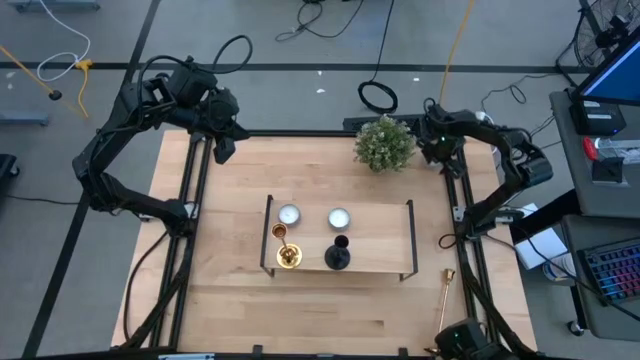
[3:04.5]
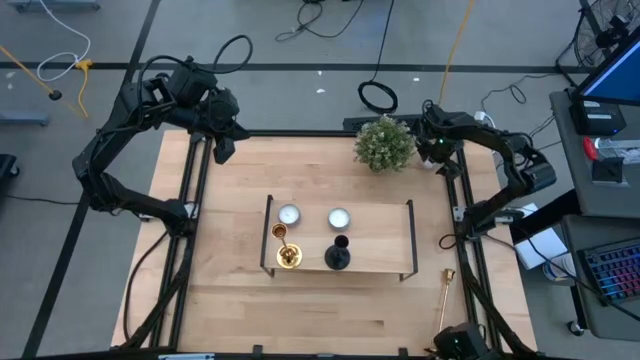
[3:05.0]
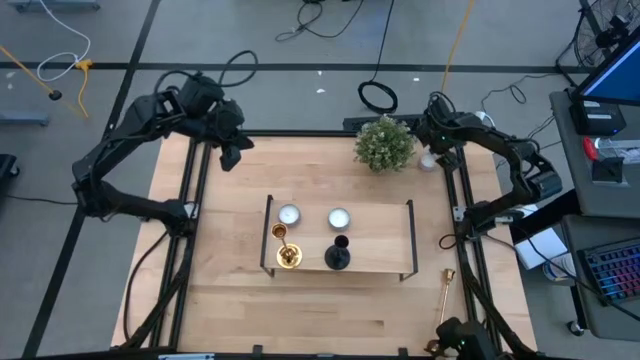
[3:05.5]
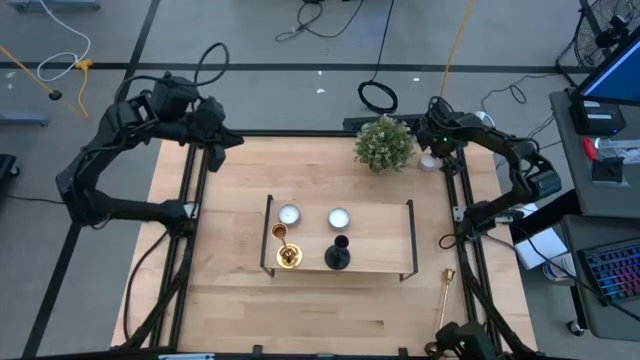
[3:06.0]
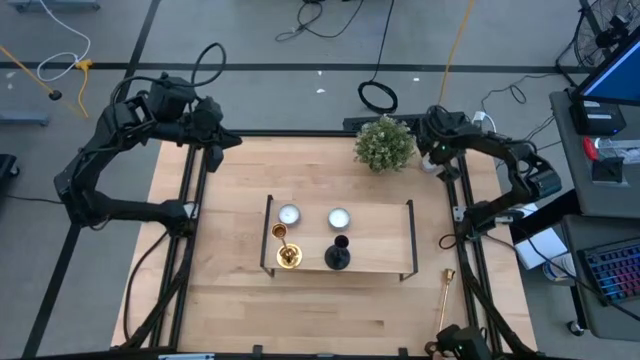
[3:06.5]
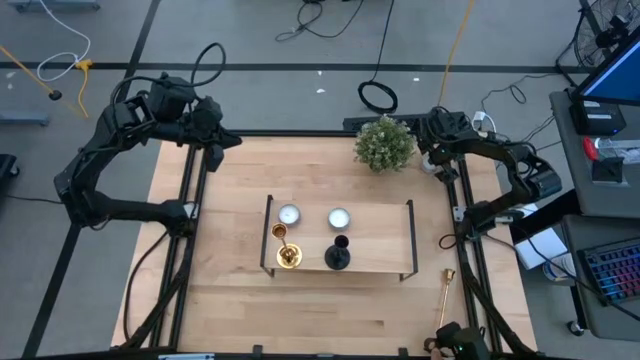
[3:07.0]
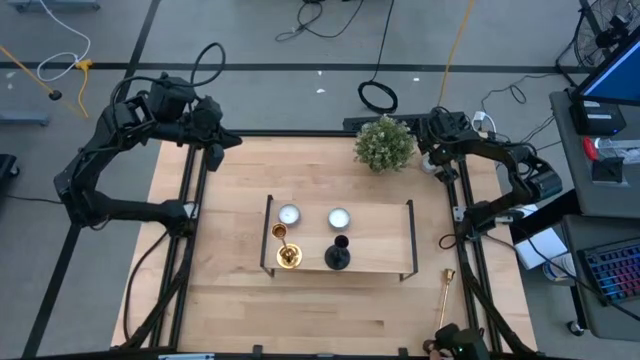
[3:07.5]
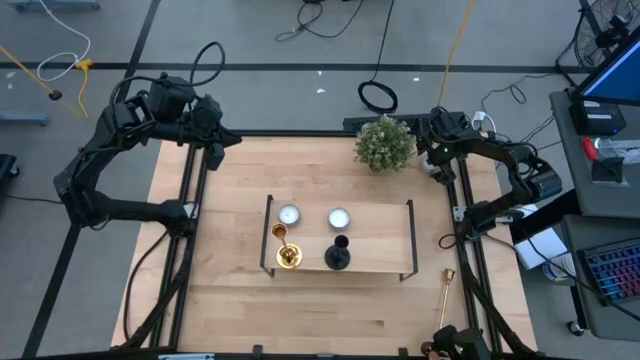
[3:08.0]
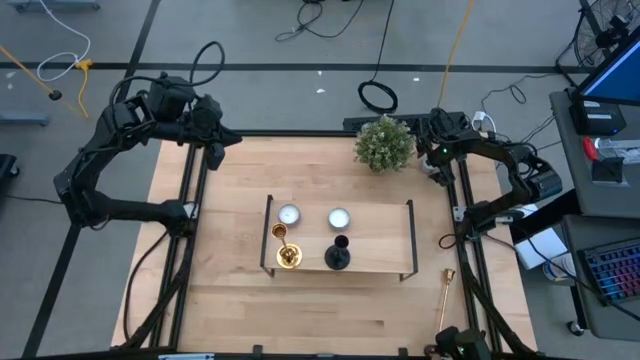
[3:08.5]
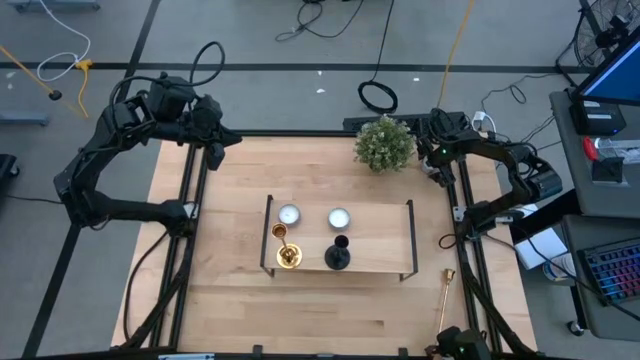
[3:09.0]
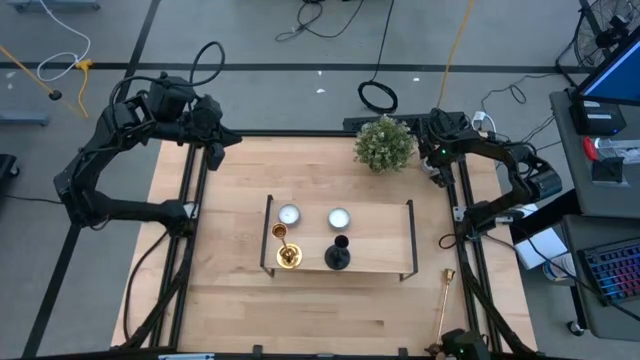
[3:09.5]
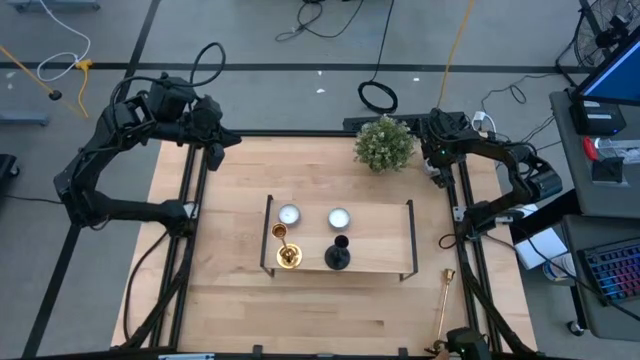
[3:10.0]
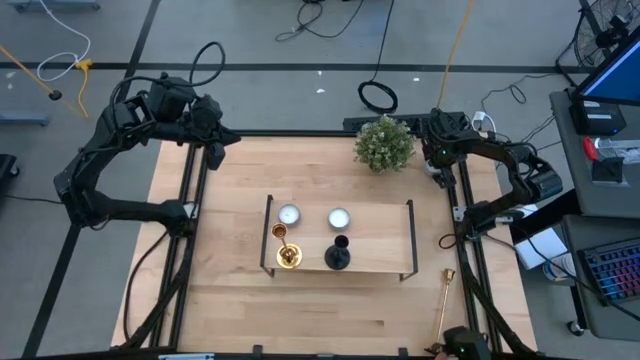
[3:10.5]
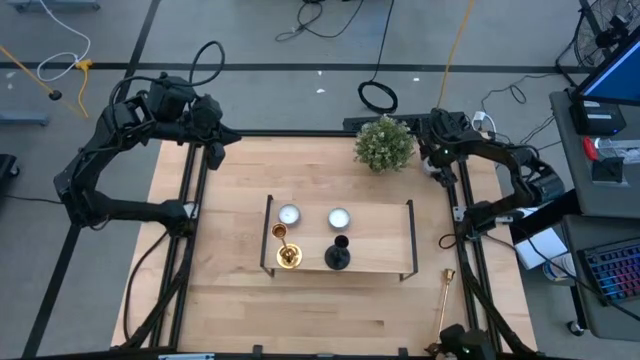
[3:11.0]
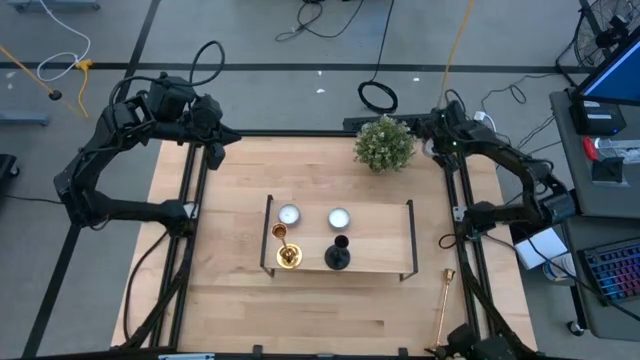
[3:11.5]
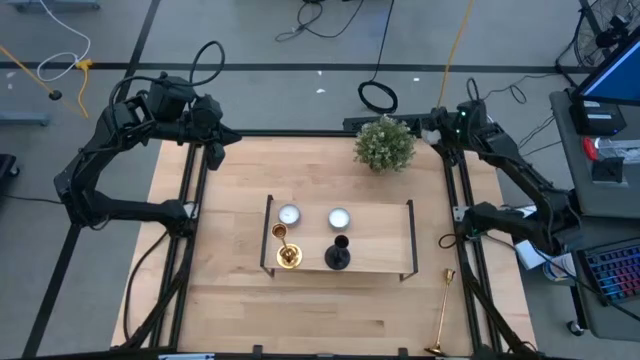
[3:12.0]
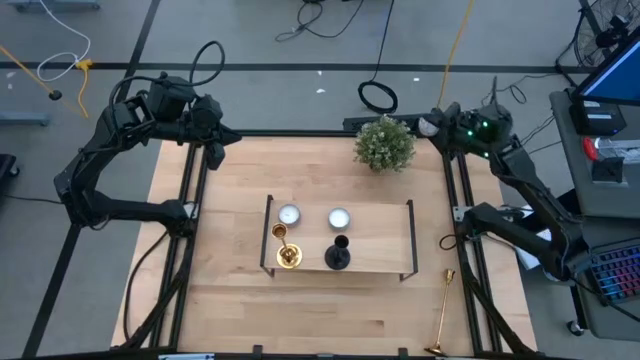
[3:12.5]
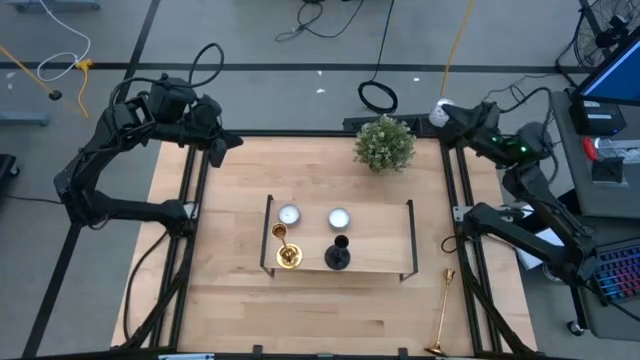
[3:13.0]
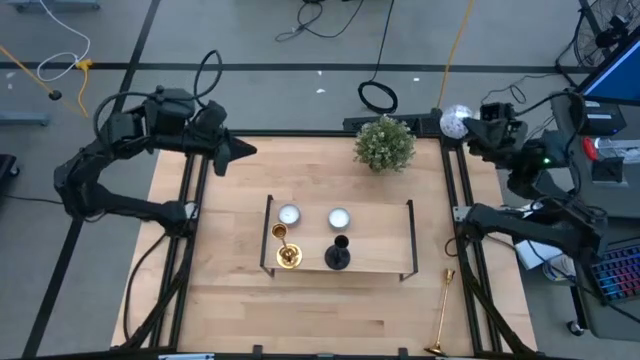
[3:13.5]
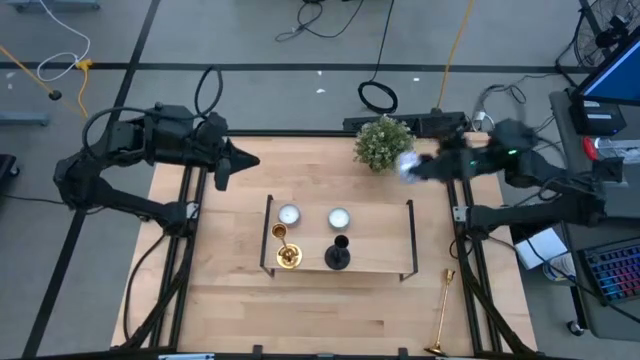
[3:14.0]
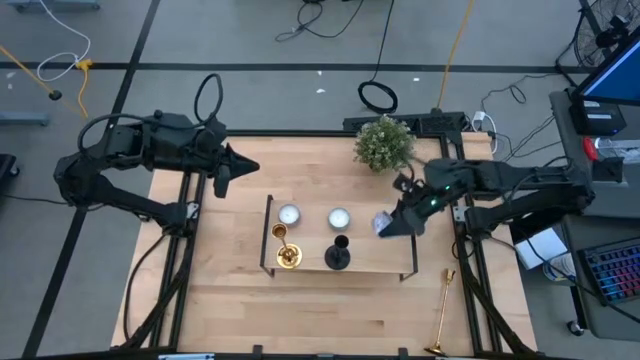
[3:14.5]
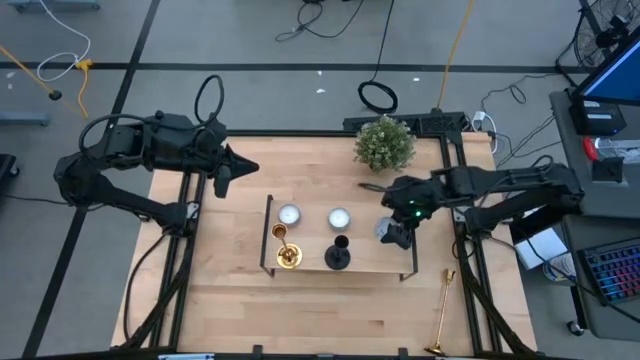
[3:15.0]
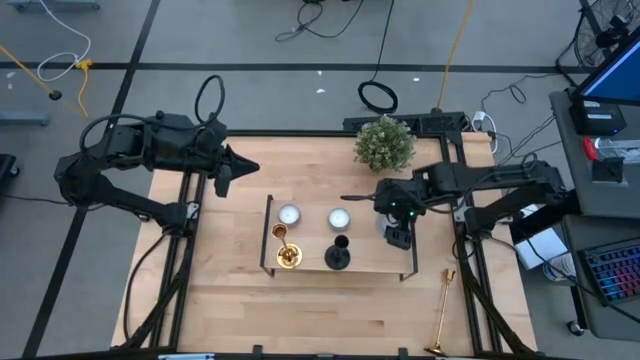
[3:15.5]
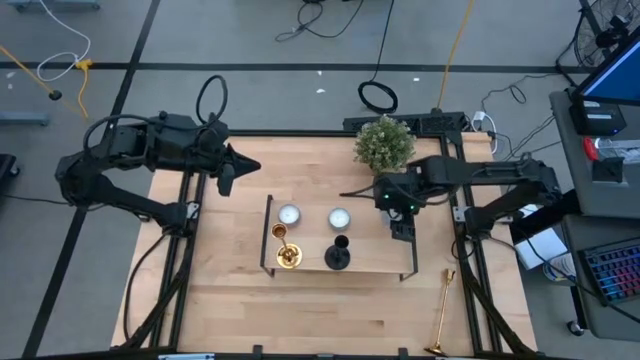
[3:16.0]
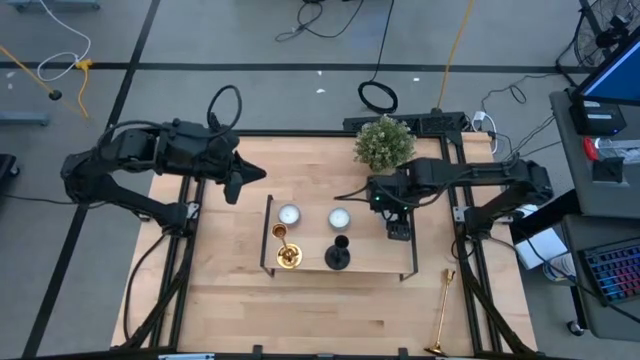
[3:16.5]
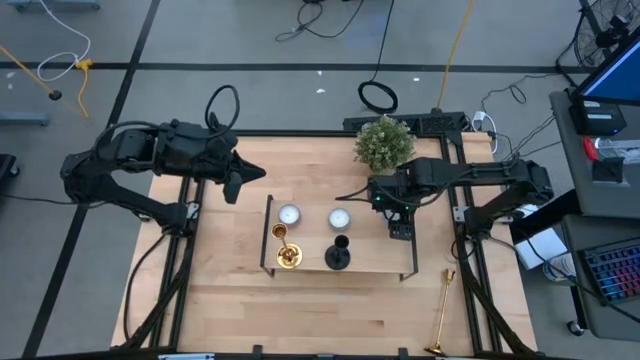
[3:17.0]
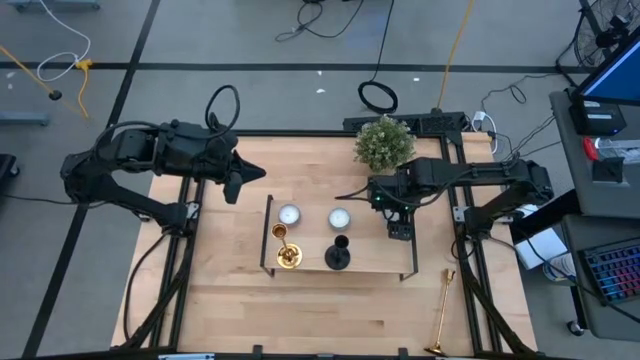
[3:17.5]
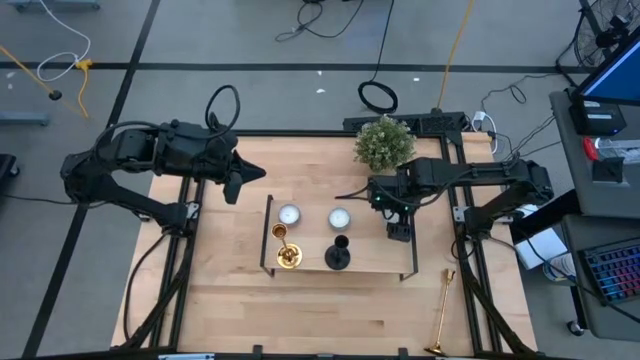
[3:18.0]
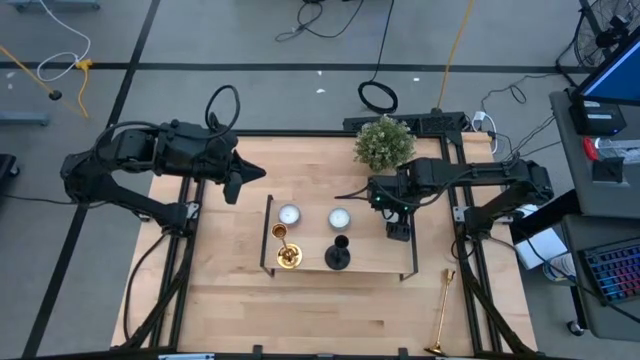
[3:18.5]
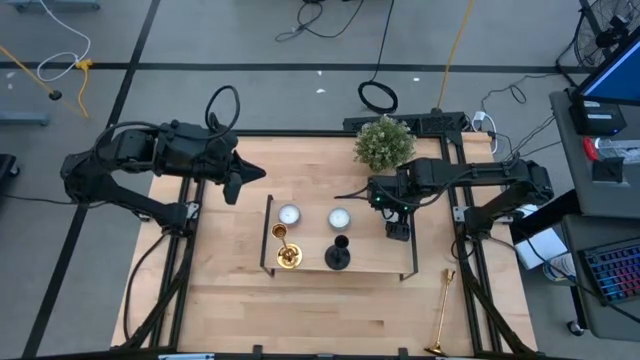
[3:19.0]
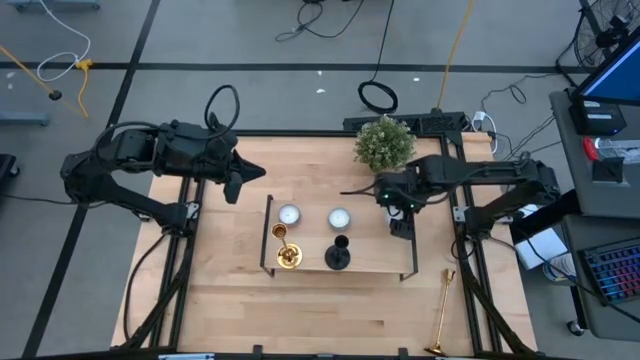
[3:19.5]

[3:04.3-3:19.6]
Task: Pick & Place candle stick holders
Put the white red scented candle on the shelf

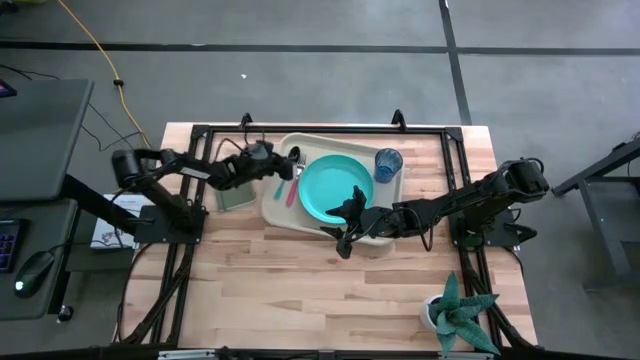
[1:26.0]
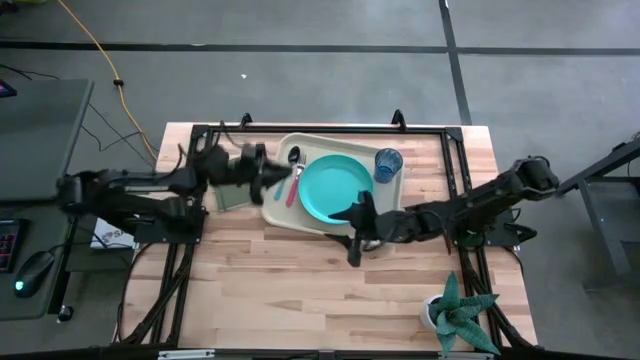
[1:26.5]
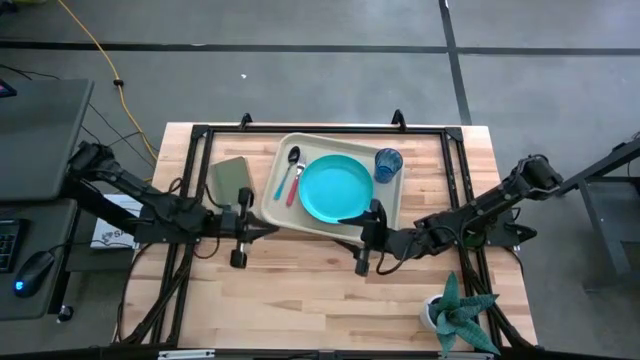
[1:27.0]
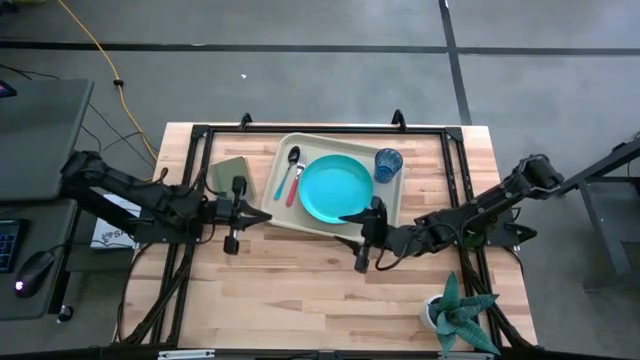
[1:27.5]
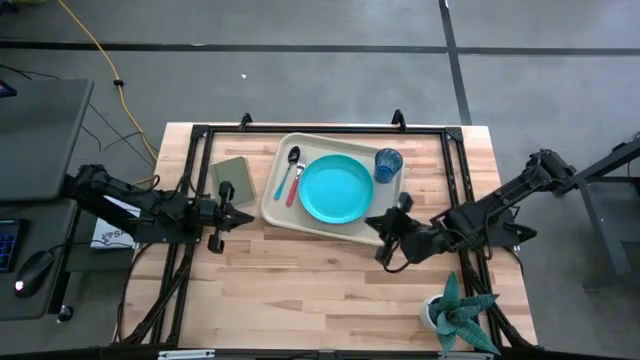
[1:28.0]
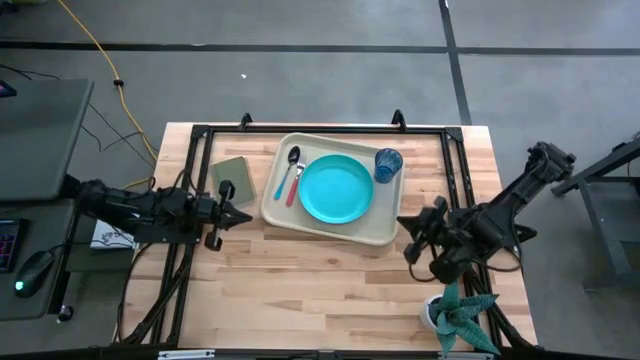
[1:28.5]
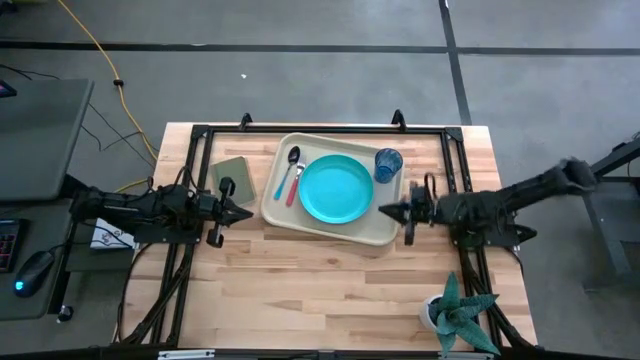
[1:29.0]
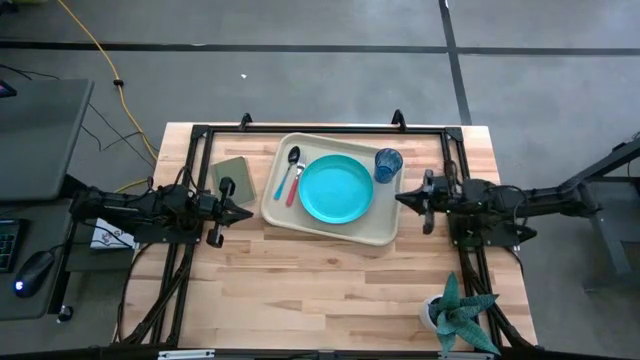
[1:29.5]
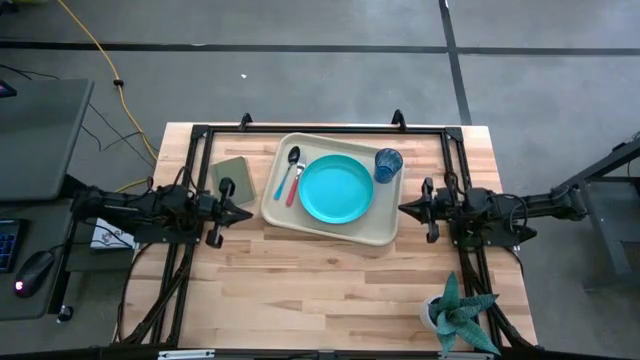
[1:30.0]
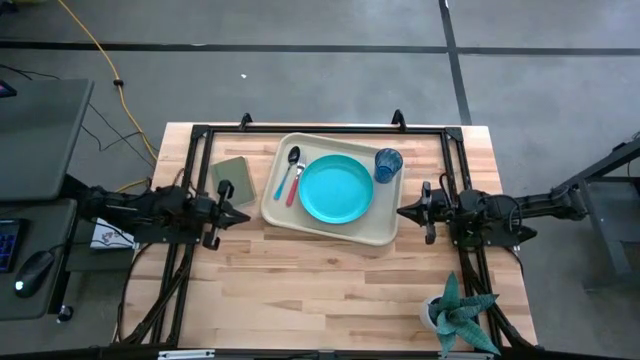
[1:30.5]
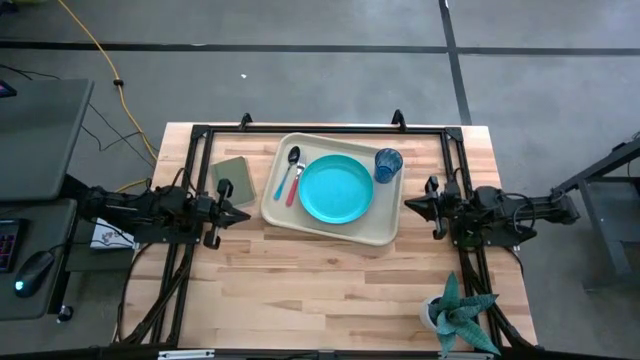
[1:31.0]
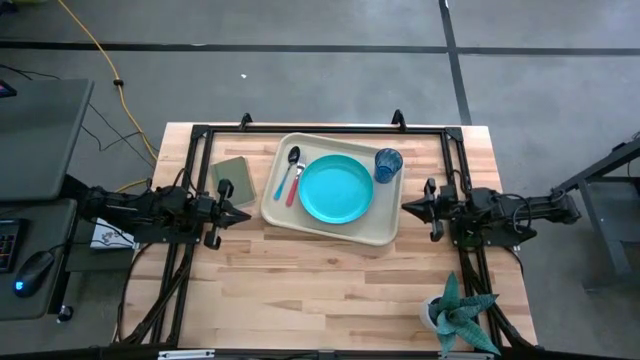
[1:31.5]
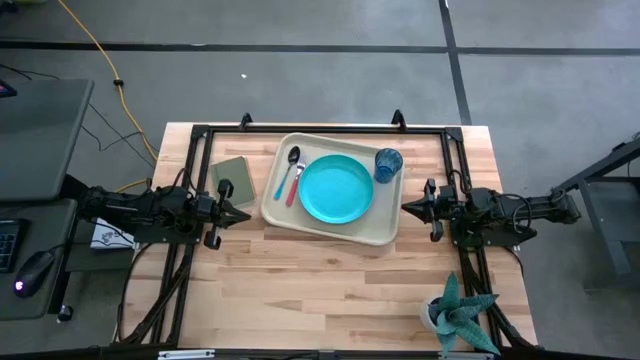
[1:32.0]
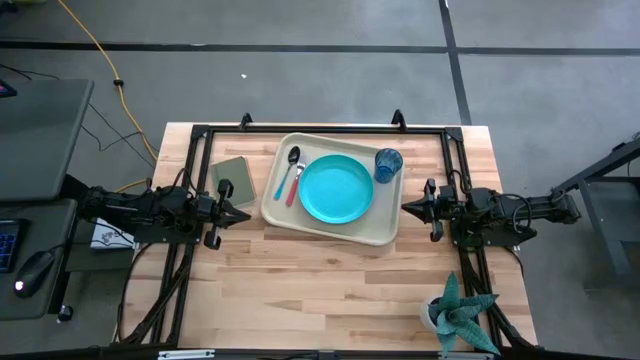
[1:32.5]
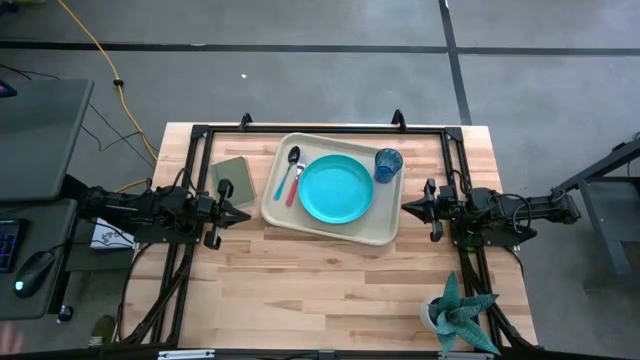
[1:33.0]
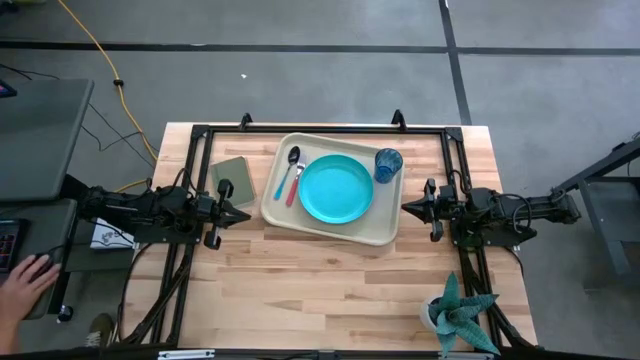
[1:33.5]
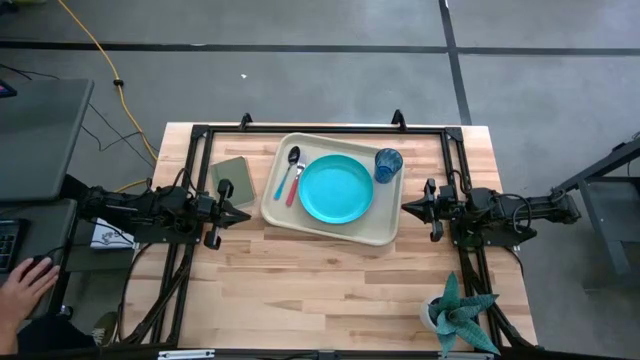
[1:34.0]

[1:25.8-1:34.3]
Task: Pick and place plate/cup/fork/spoon on tray
Return to Home Position
